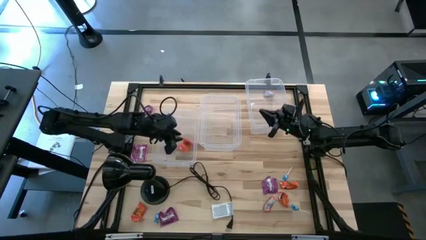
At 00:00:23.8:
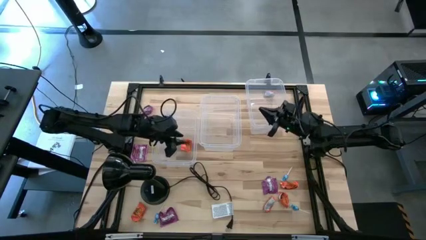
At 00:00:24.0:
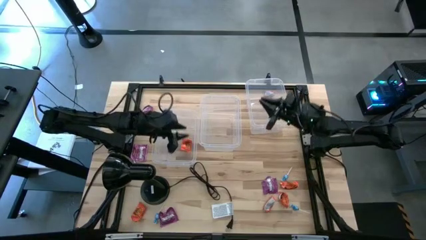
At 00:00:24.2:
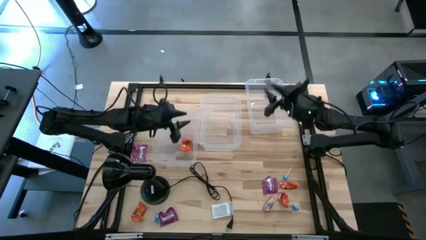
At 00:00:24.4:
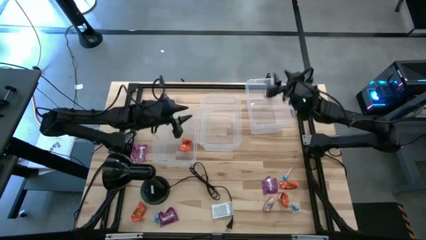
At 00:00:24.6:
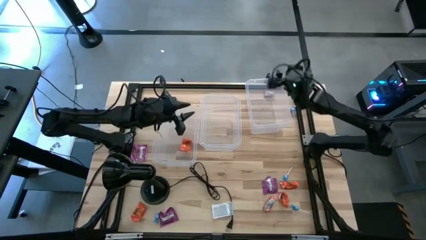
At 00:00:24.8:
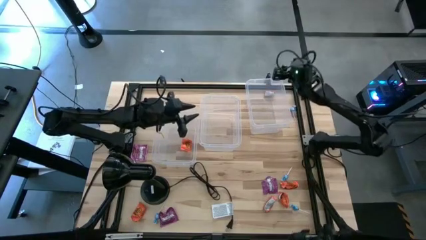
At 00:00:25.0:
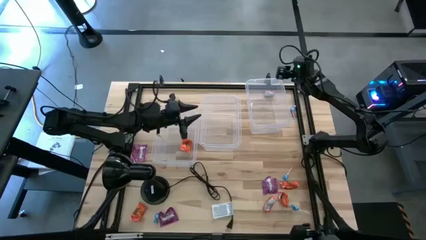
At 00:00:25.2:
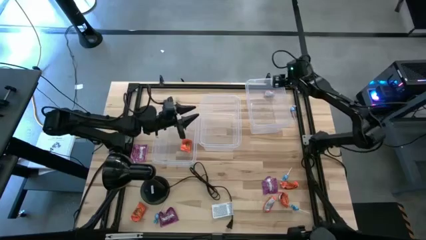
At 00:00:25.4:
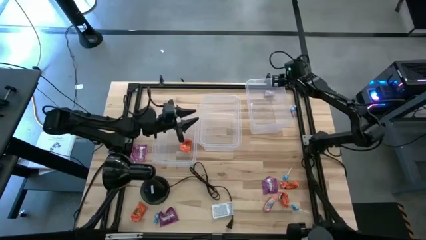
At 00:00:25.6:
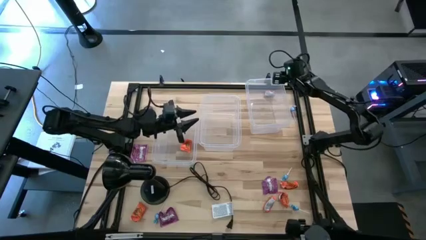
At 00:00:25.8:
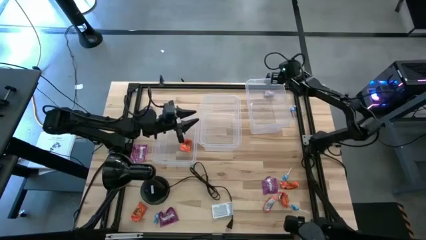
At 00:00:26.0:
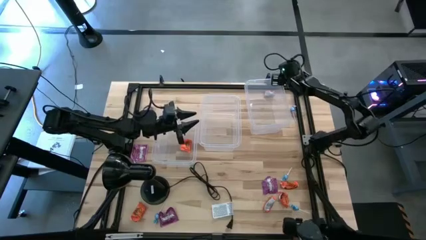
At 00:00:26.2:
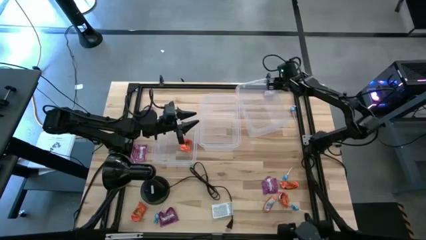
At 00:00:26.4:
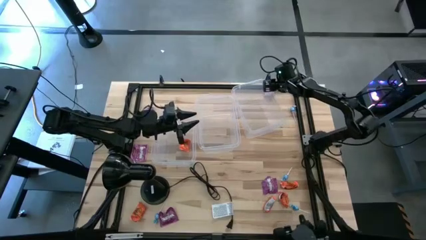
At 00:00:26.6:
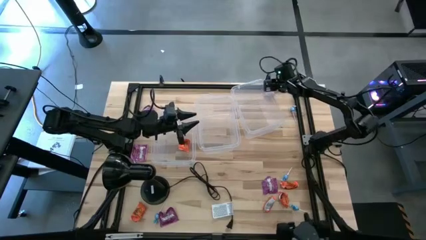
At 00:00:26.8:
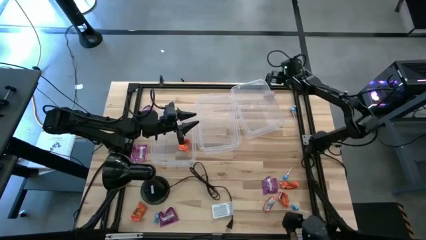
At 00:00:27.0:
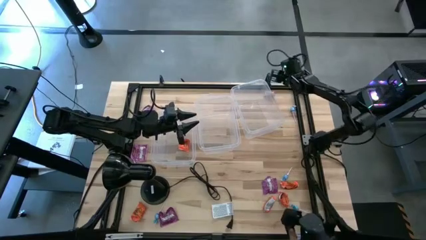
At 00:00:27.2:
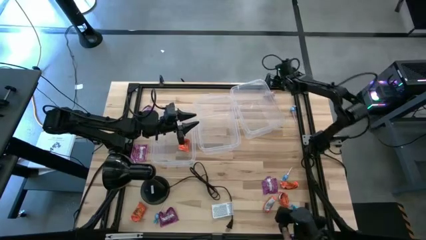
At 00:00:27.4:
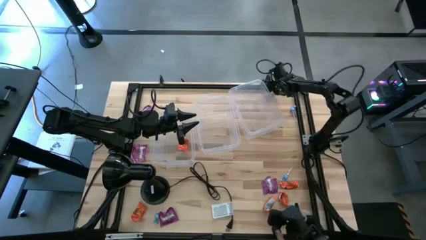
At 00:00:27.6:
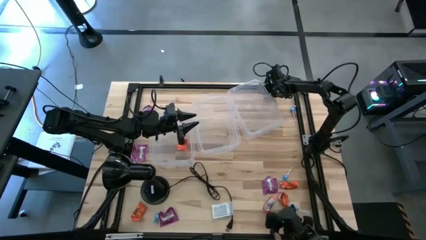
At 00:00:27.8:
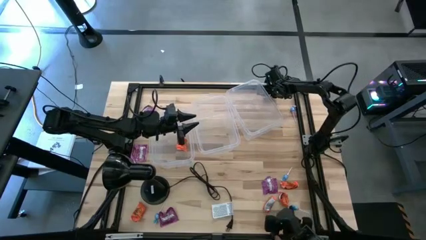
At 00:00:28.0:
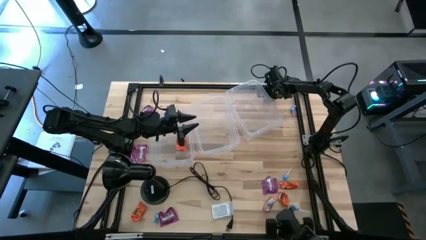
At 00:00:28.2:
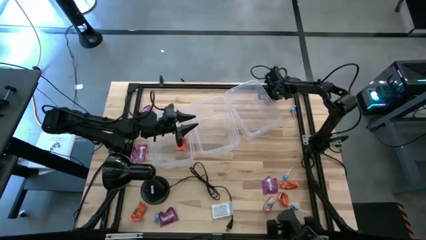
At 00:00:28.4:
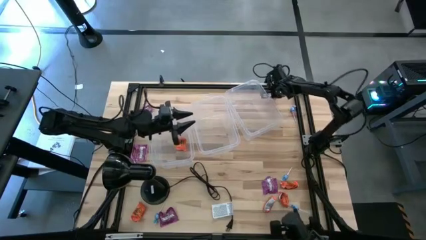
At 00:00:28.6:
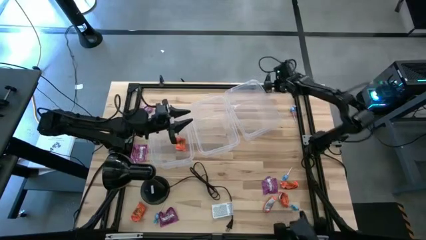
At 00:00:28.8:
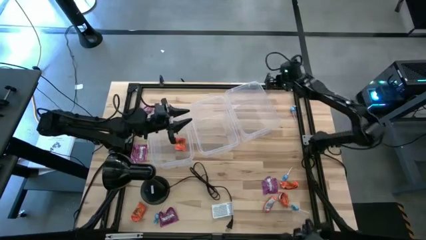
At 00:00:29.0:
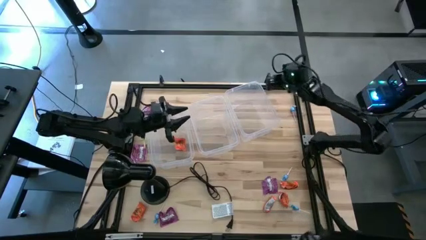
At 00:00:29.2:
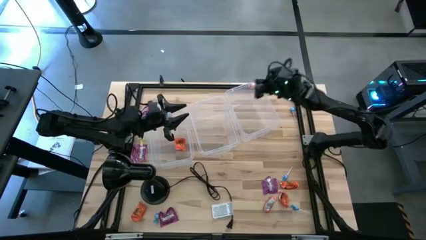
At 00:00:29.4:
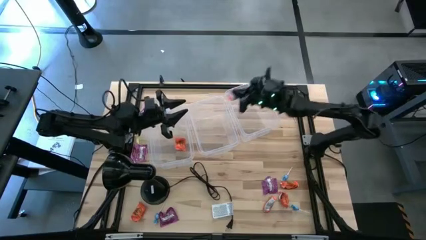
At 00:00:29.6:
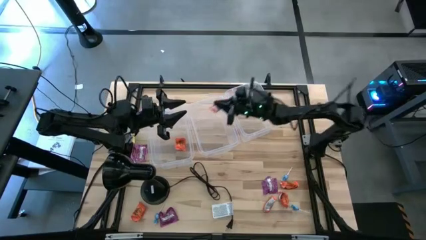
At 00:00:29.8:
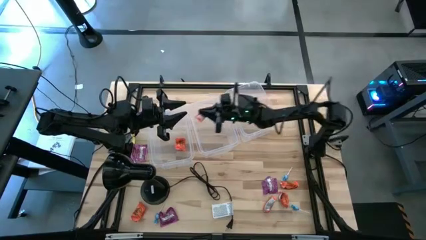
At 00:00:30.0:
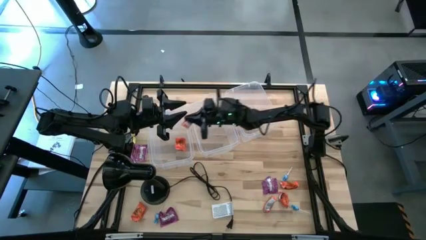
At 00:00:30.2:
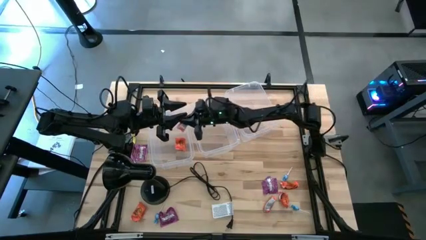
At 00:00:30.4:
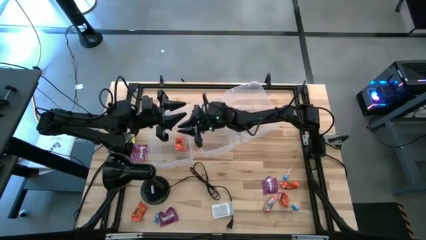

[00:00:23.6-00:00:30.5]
Task: Sort candy
Put the orange candy into the left transparent bin

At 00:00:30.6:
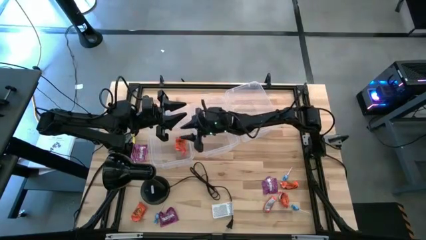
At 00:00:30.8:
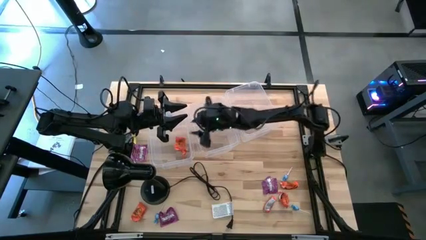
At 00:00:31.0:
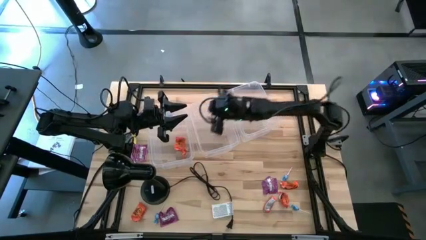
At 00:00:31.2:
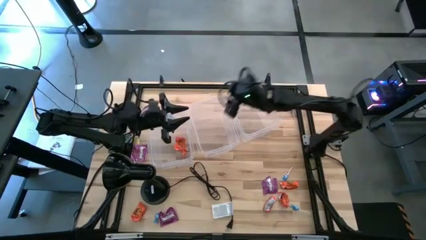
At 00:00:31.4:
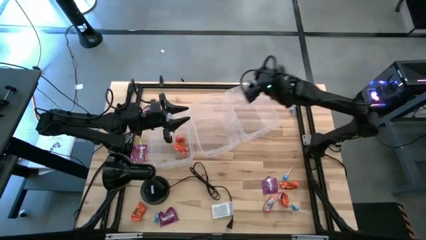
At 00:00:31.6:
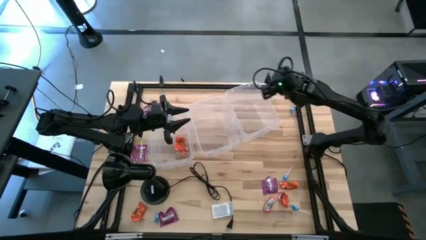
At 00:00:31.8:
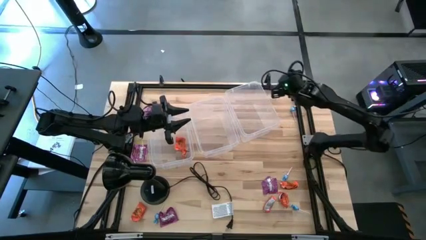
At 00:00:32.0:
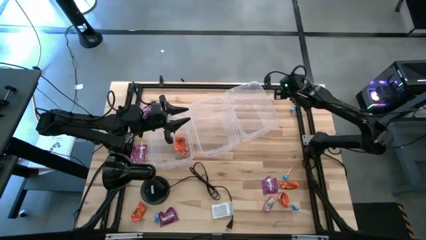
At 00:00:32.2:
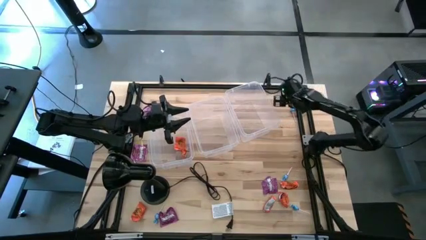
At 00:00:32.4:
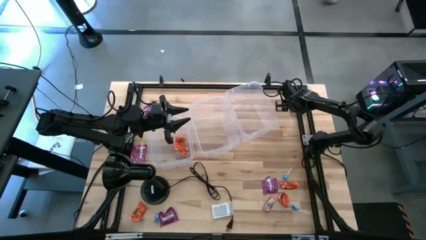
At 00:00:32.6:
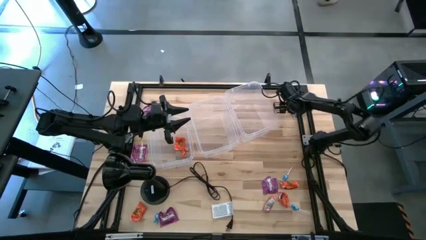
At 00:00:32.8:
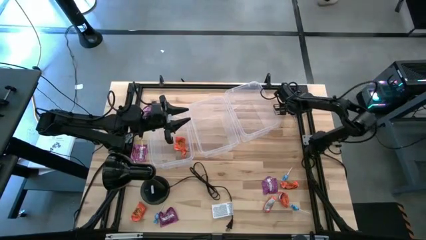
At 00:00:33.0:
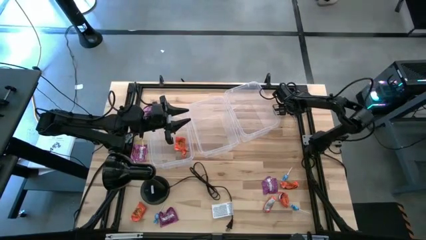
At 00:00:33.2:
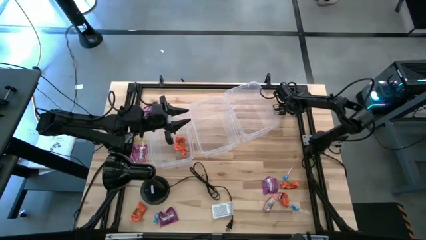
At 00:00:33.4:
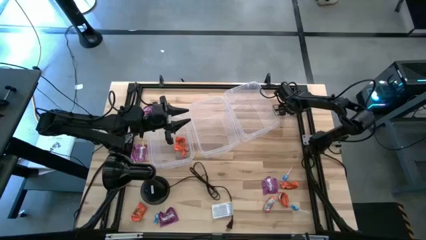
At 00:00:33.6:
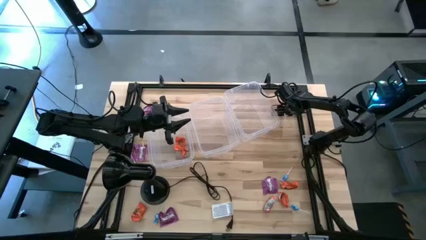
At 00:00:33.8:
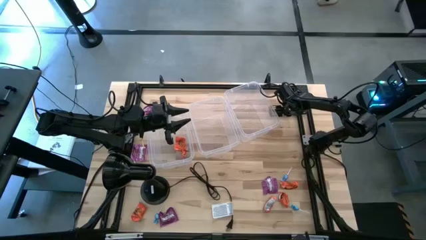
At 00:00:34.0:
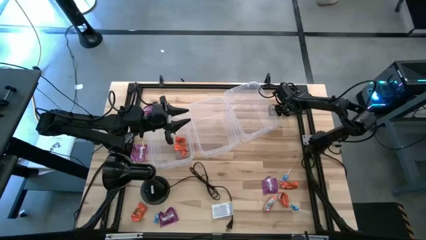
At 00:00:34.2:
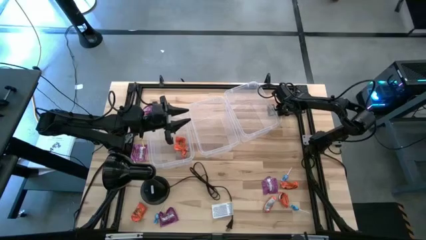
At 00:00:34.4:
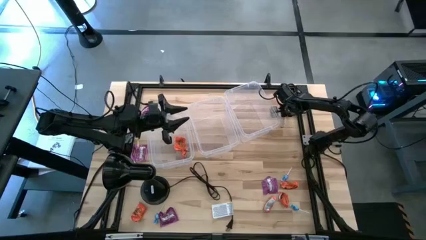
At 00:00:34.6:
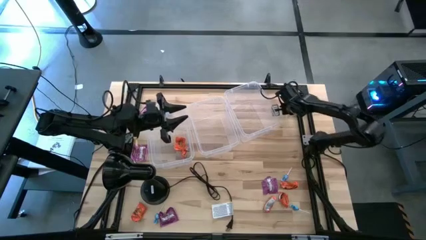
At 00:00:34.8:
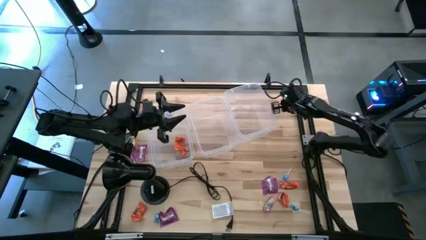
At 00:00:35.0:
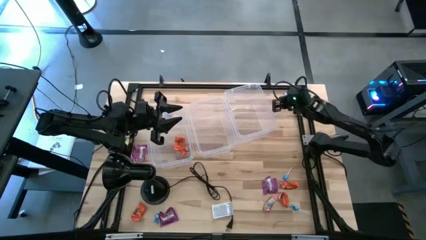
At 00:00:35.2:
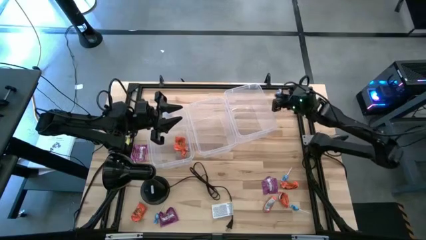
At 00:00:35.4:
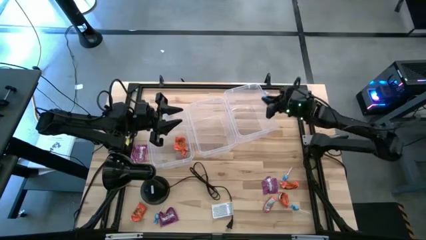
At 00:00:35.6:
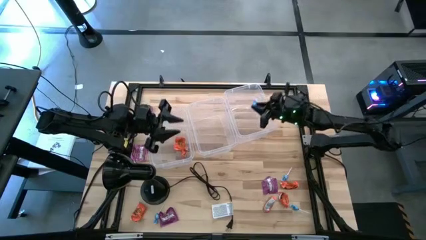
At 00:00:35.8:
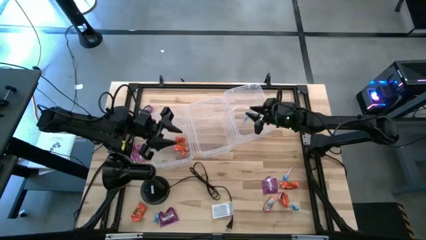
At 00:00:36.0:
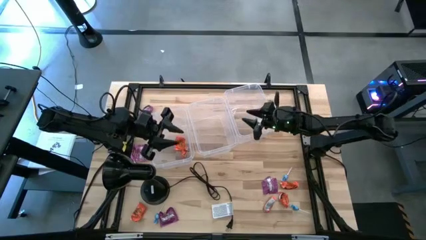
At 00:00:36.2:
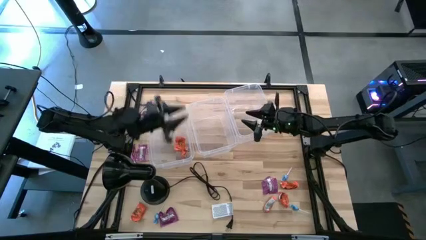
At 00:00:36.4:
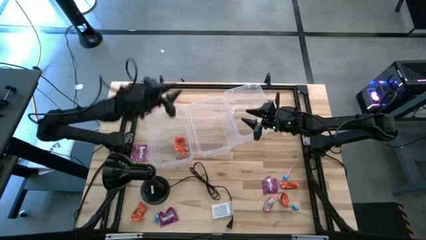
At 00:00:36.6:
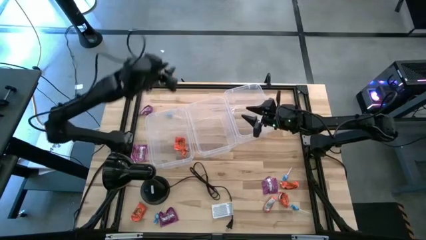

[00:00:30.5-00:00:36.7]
Put the blue candy into the right transparent bin

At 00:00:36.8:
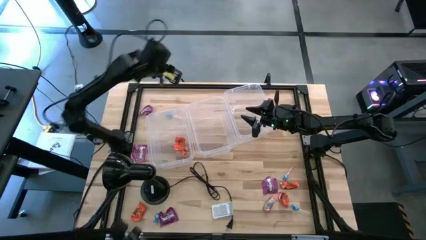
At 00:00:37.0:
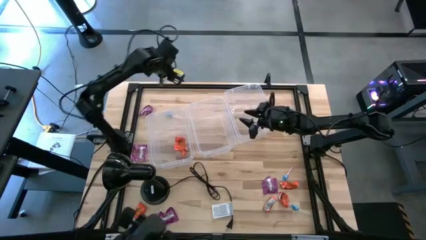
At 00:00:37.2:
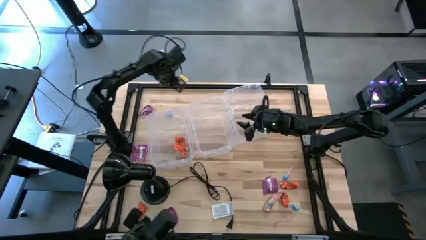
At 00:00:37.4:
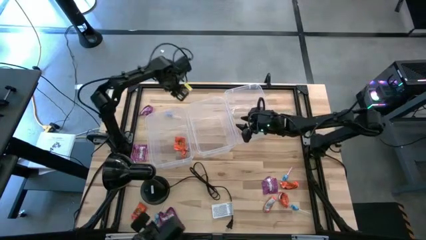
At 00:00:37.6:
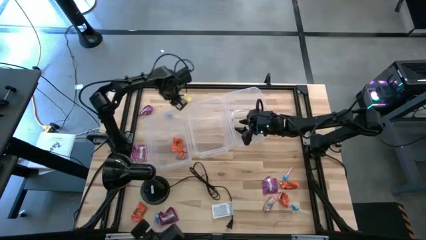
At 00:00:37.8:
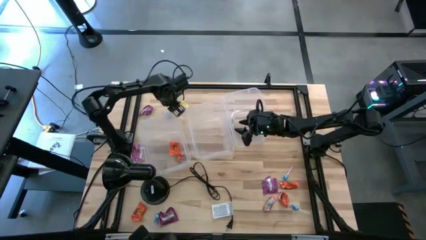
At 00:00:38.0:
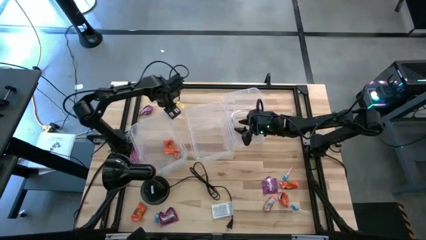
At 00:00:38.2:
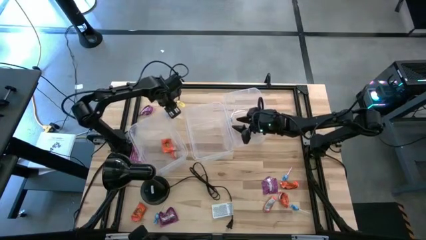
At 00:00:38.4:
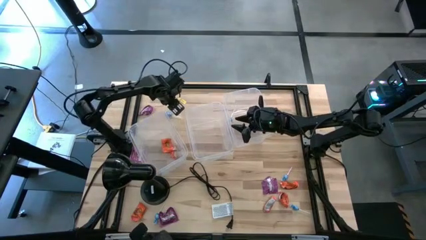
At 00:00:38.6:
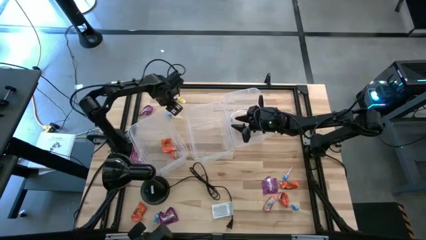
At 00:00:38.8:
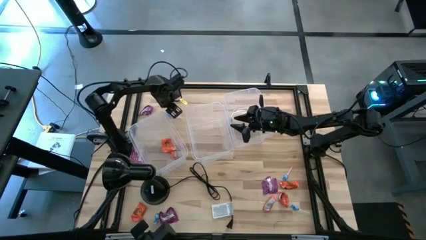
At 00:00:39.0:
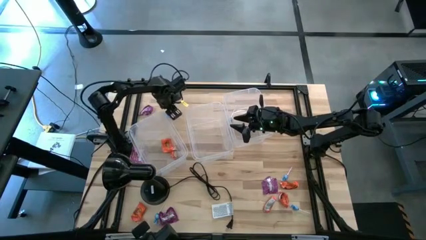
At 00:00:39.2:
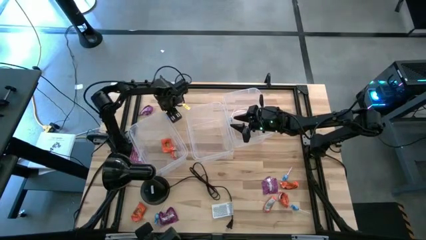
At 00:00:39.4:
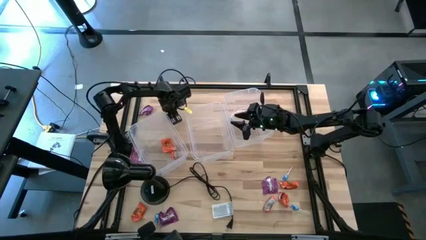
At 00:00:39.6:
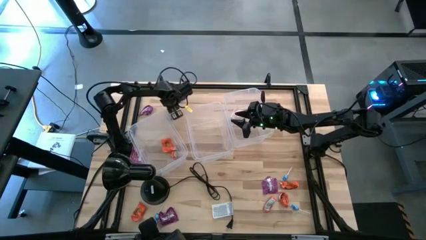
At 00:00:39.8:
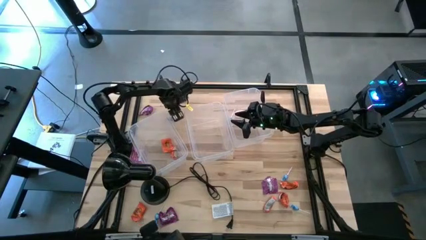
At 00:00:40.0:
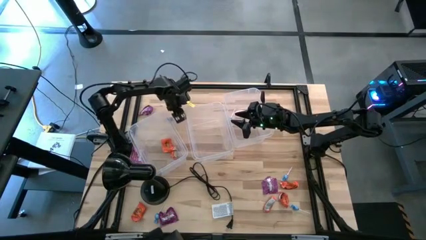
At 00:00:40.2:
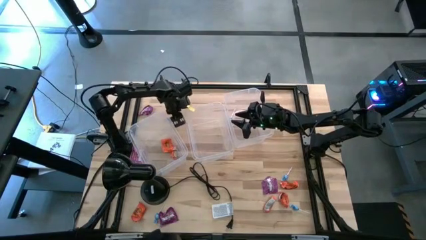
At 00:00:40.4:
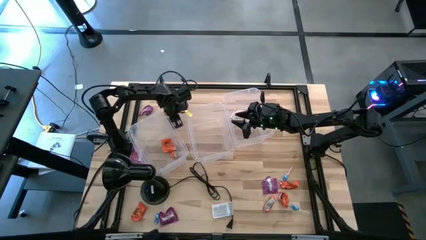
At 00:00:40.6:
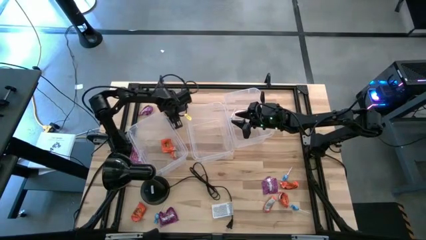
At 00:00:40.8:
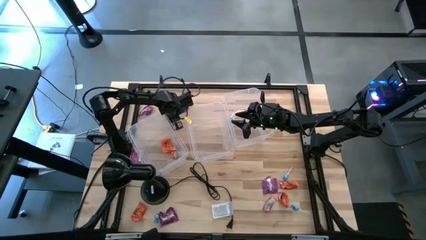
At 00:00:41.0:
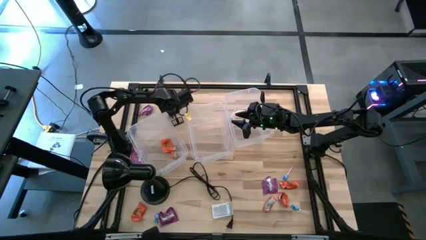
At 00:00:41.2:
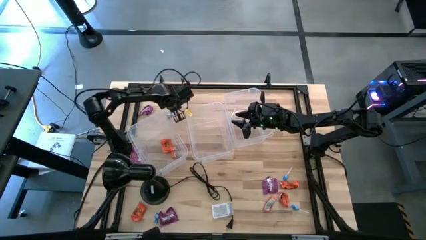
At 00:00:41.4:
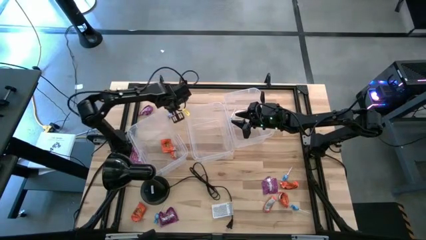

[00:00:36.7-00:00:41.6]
Put the blue candy into the right transparent bin
